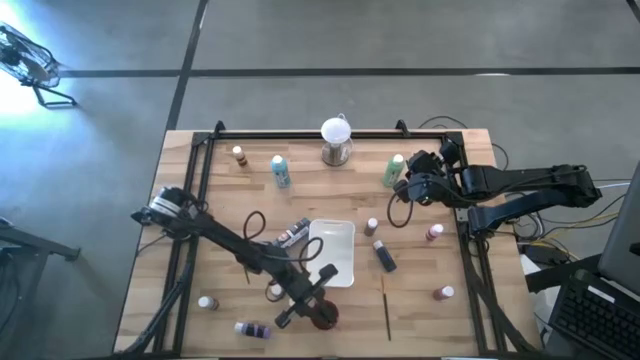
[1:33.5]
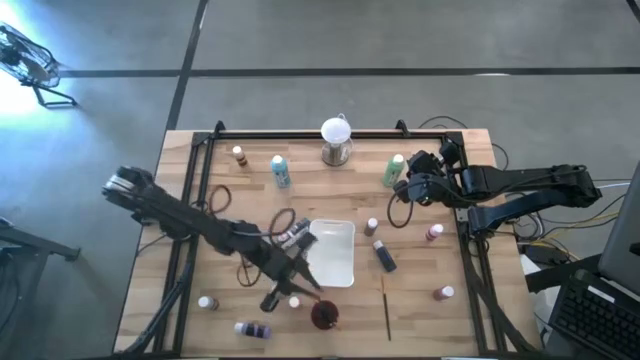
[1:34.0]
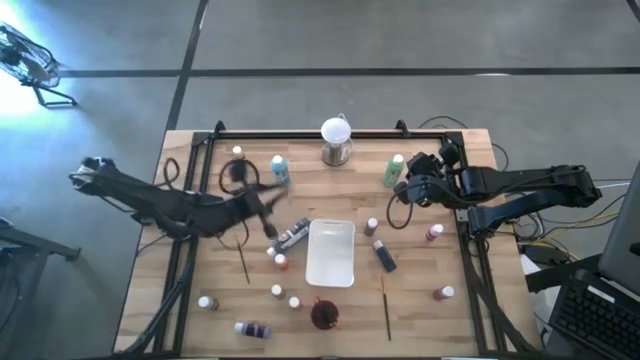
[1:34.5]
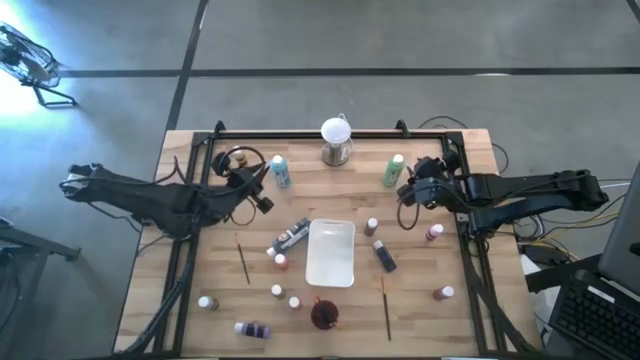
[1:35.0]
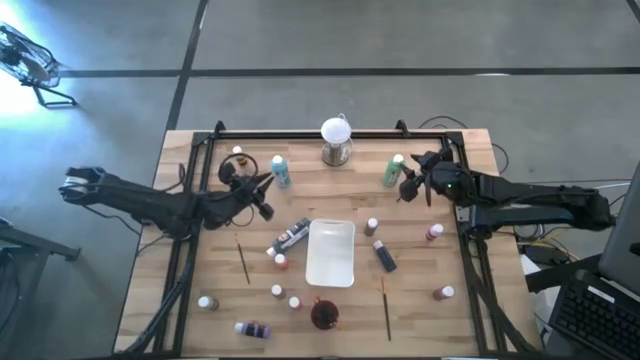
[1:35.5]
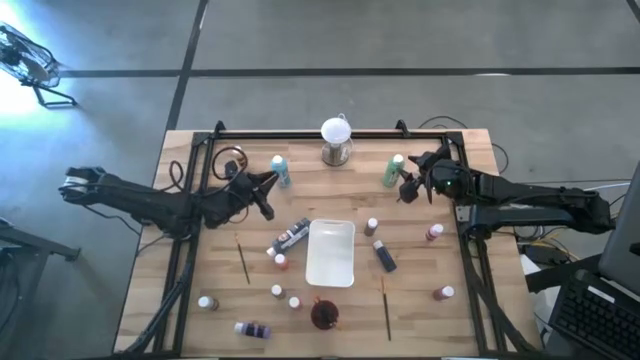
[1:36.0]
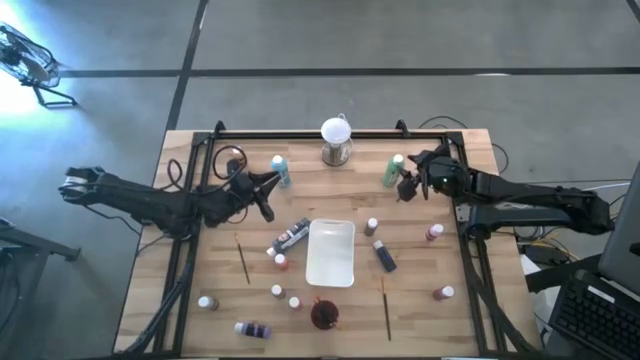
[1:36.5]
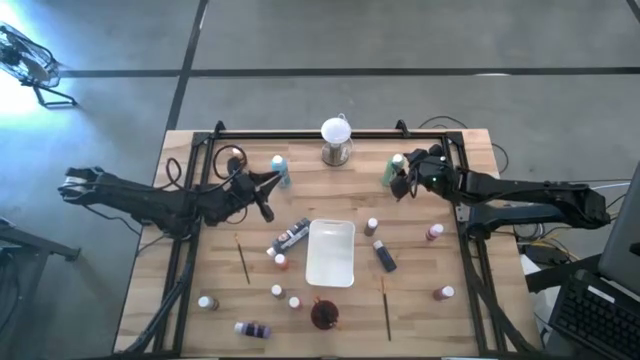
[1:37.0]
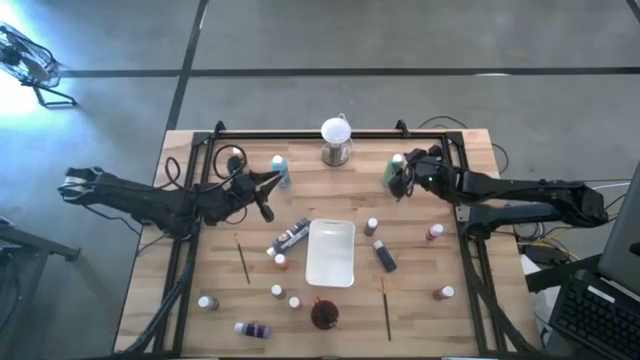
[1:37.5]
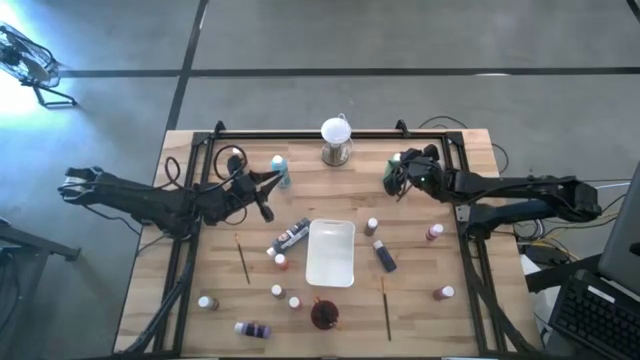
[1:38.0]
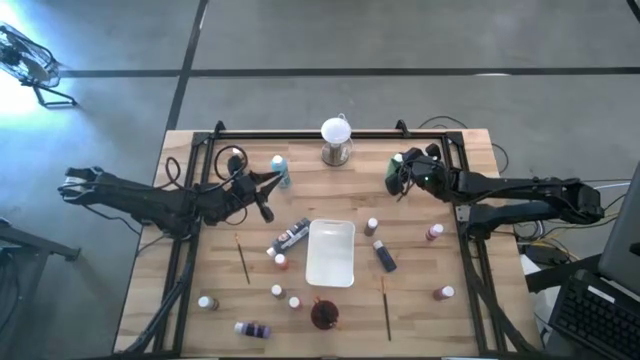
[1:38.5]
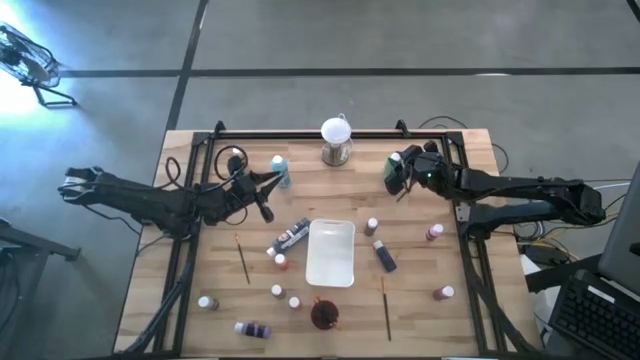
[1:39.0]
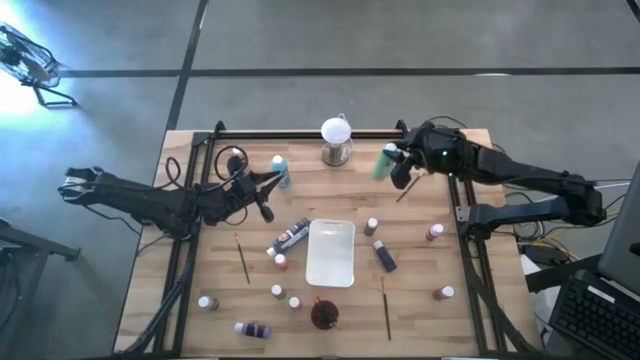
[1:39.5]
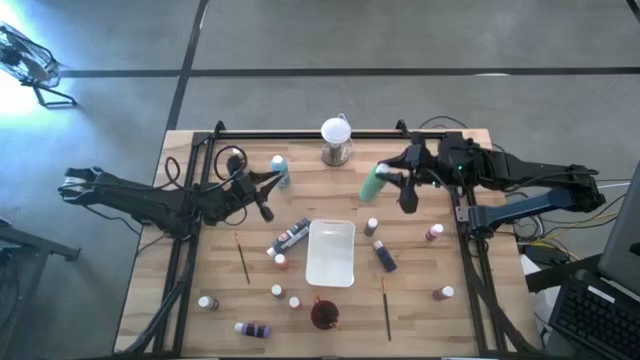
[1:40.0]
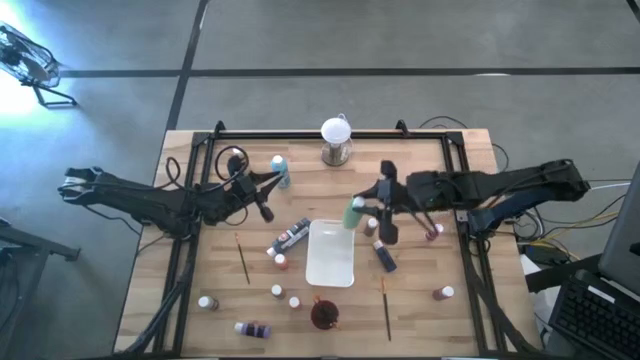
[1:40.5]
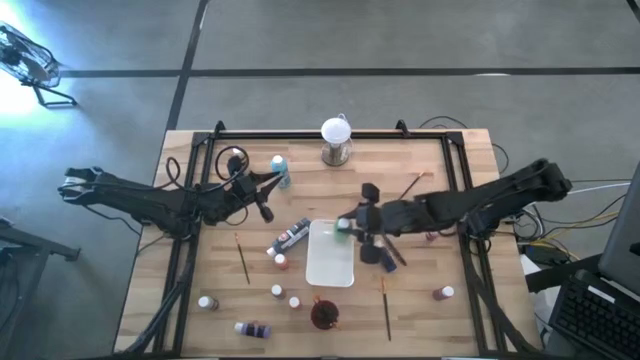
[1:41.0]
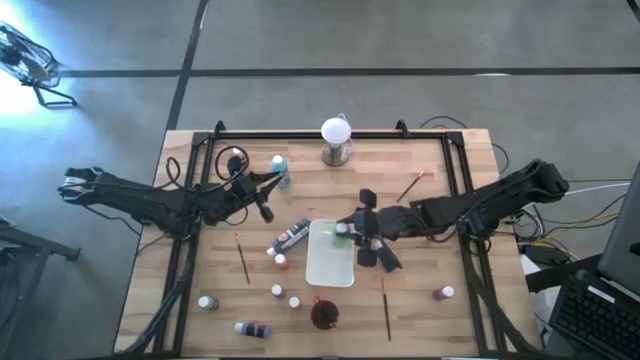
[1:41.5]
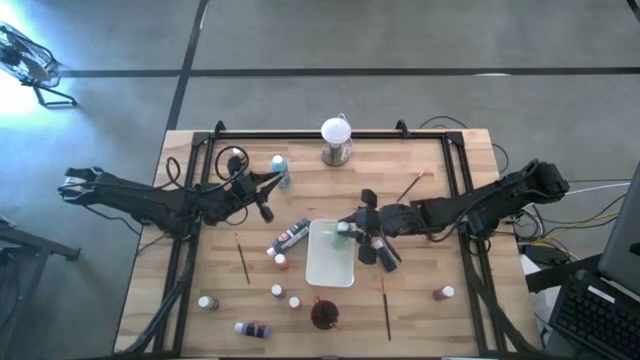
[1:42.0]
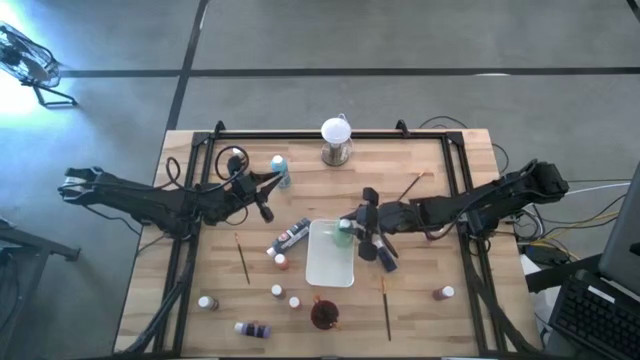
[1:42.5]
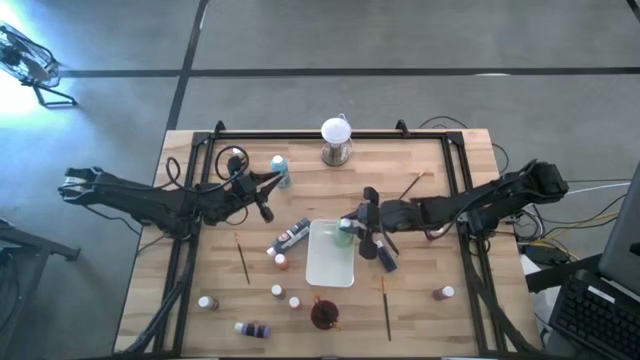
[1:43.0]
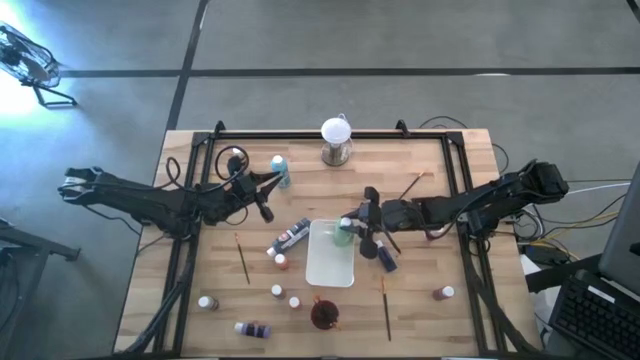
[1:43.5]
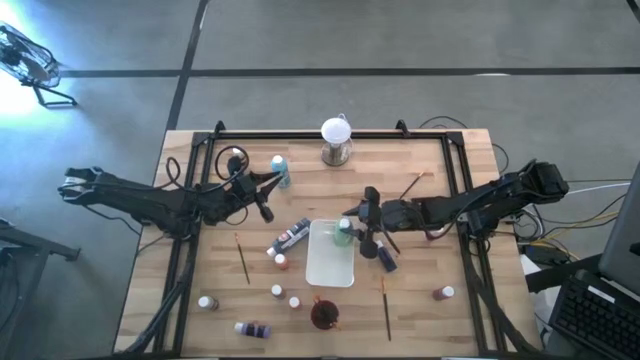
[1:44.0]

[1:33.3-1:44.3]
Task: Pick & Place Paint Supplies
Put the green paint bottle into the white bin

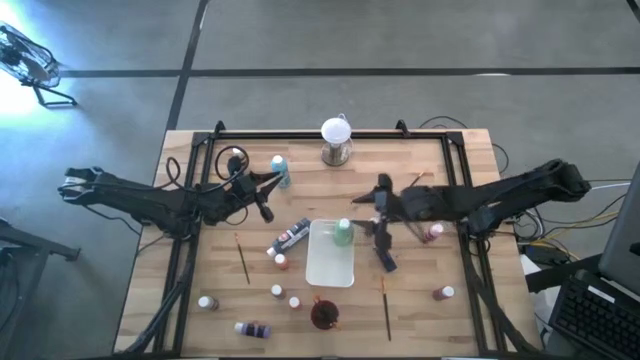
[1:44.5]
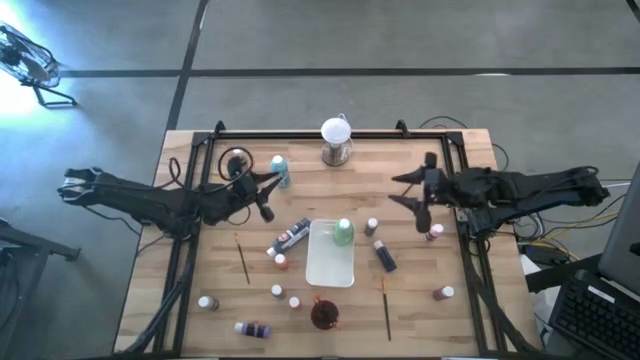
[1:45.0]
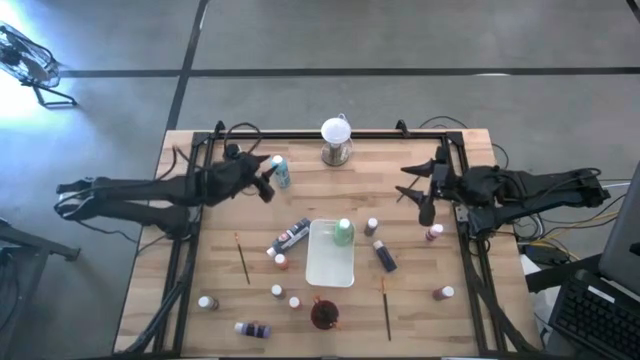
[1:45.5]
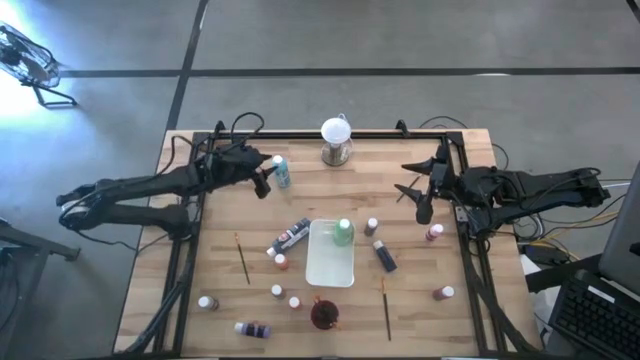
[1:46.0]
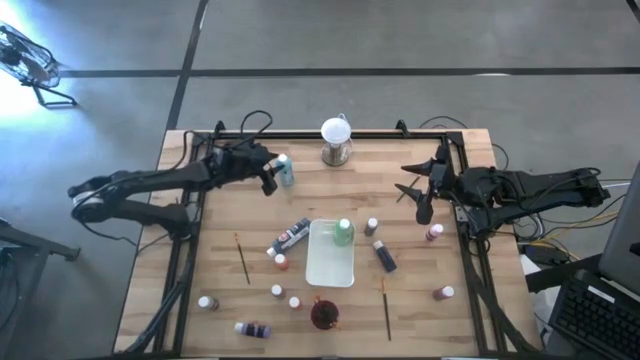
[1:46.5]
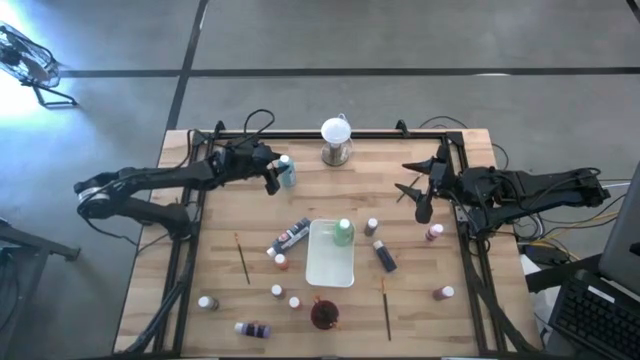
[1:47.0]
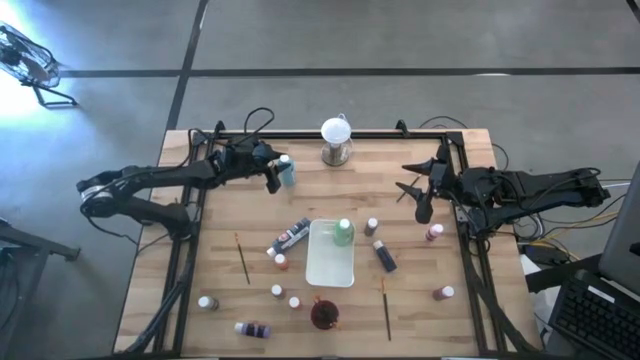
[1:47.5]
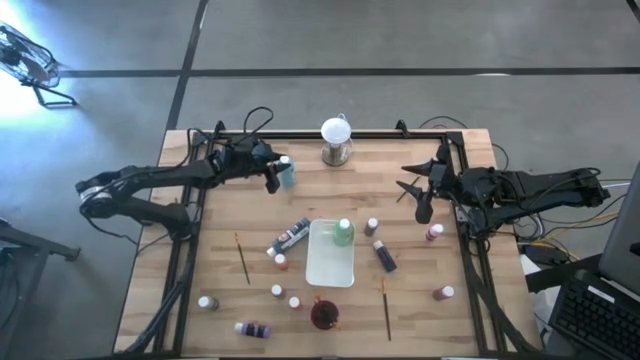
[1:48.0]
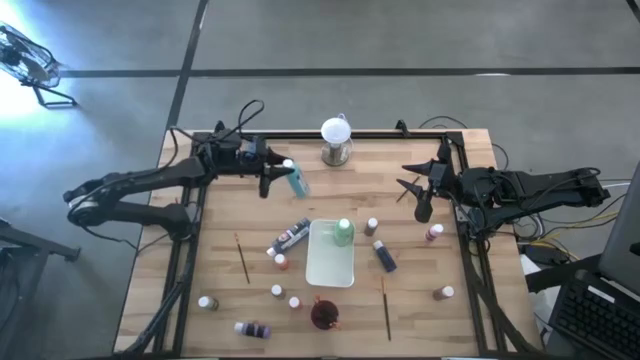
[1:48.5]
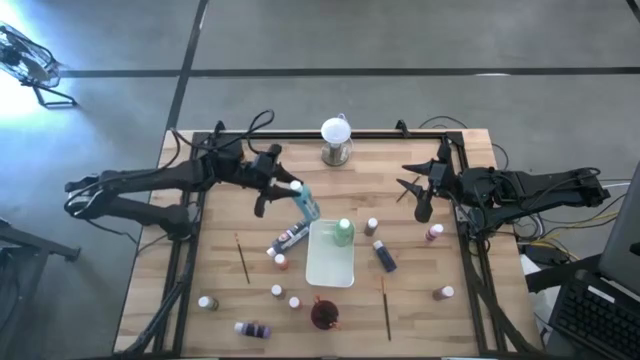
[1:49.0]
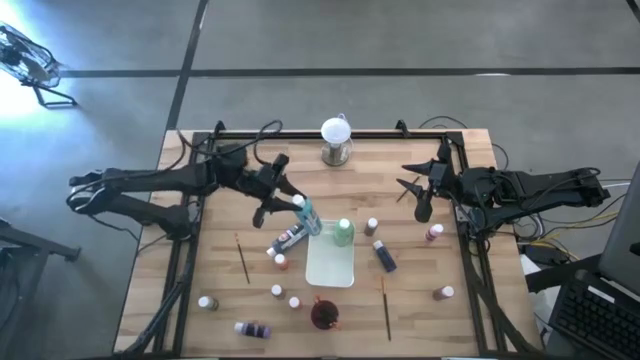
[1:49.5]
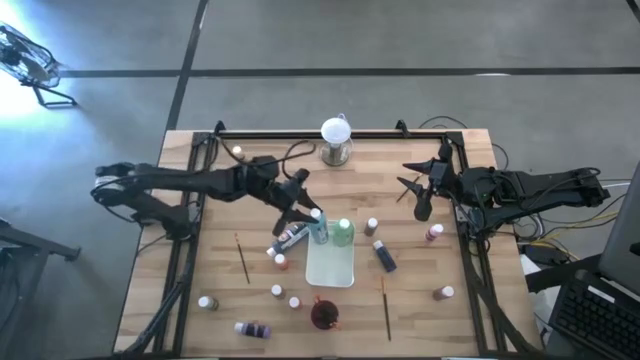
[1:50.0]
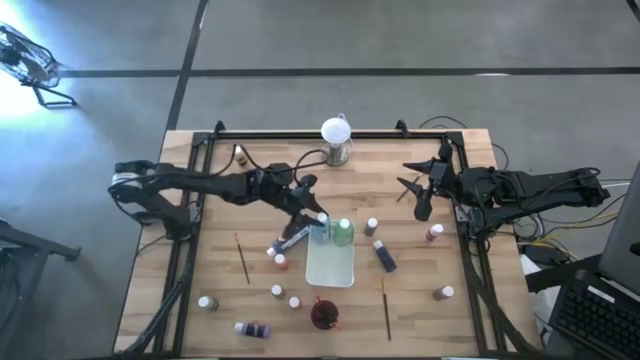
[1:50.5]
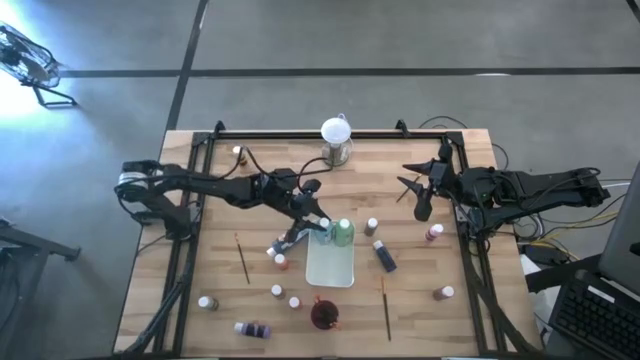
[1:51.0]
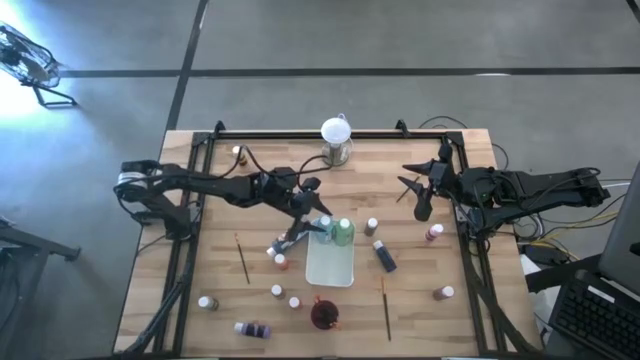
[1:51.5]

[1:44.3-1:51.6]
Put the light blue paint bottle into the white bin
